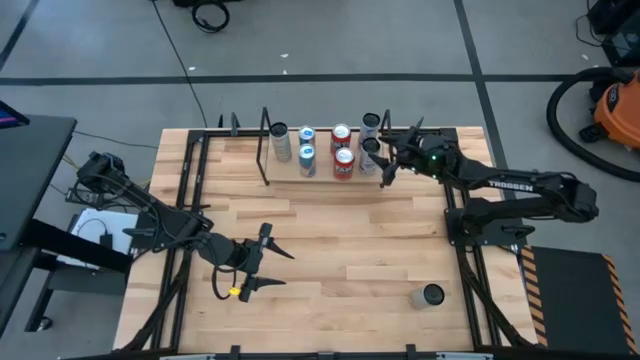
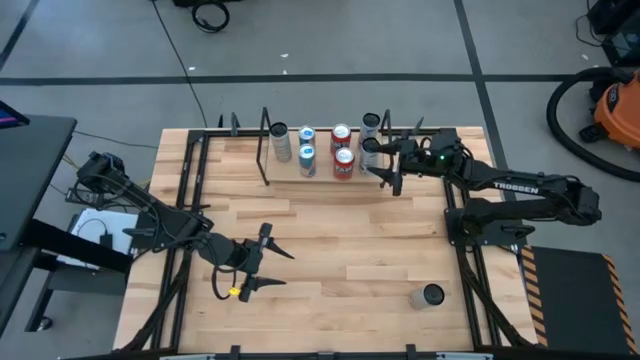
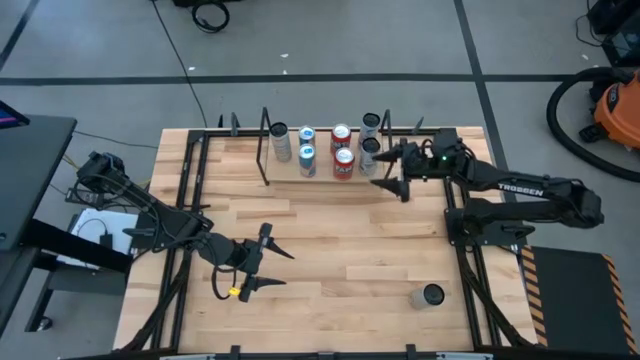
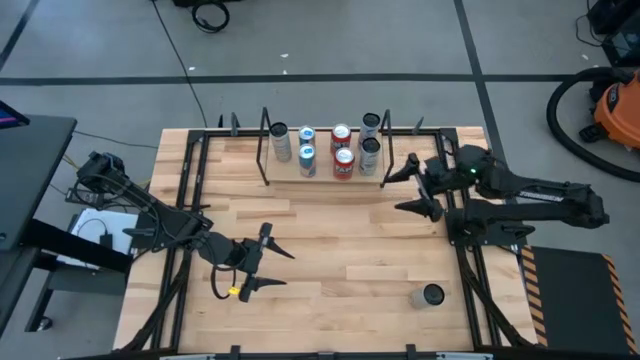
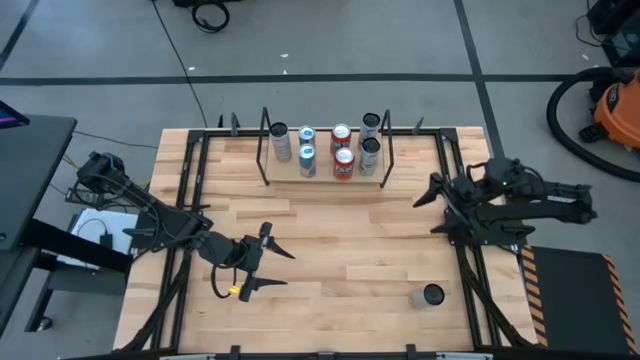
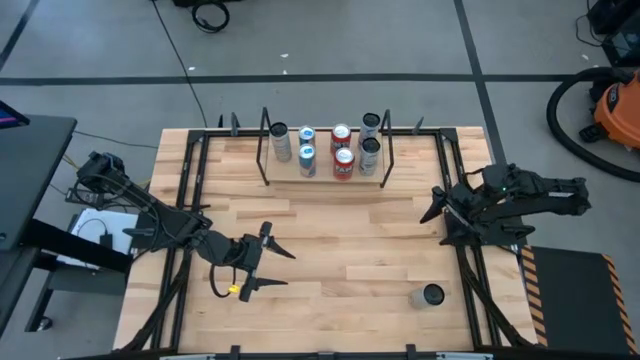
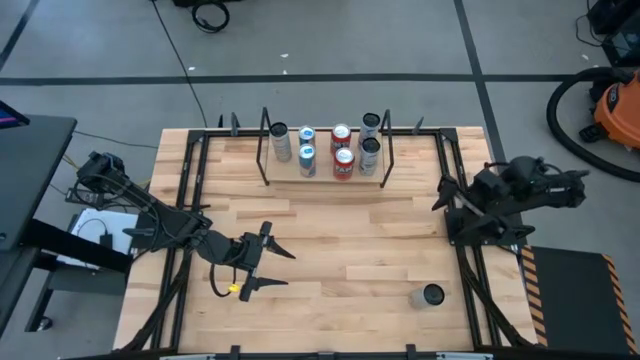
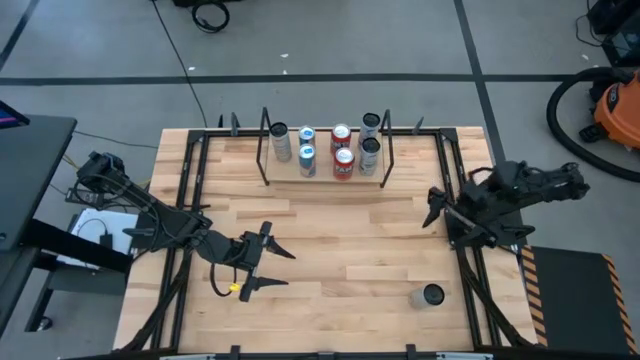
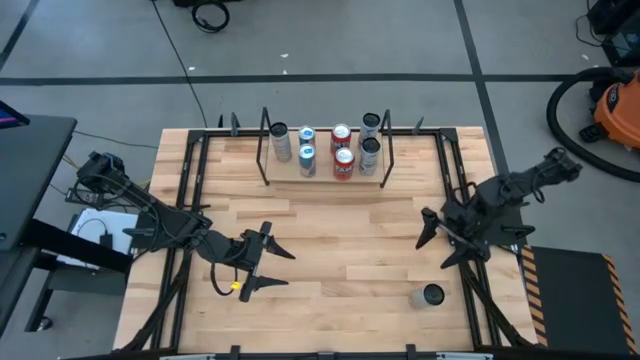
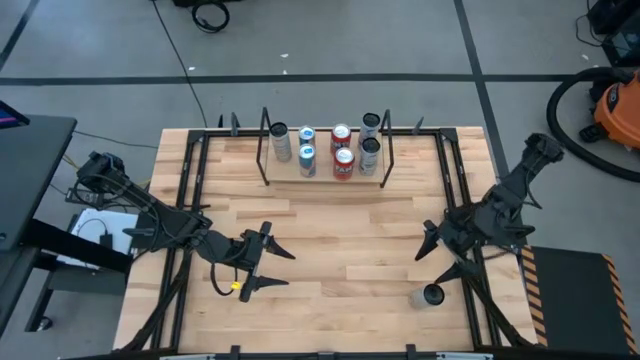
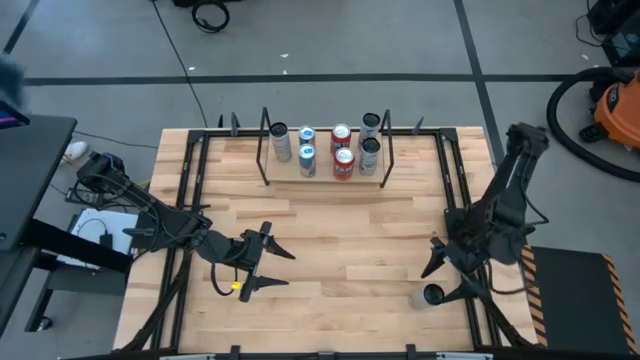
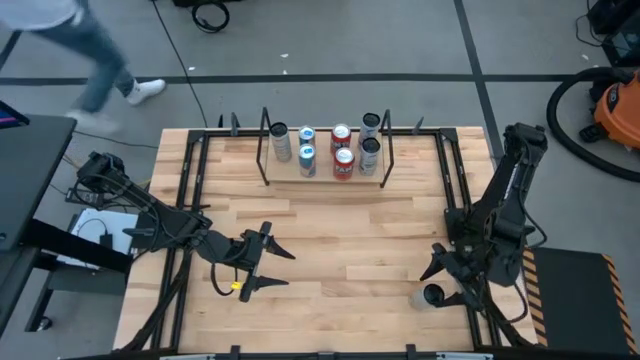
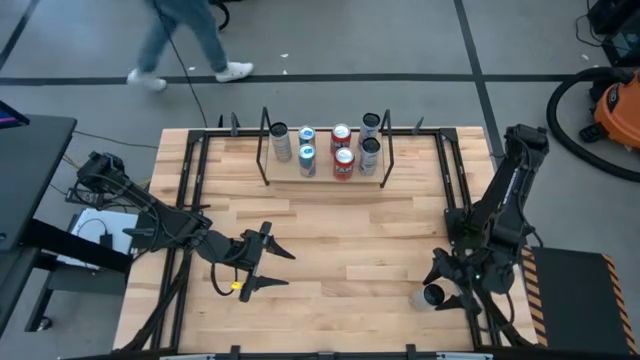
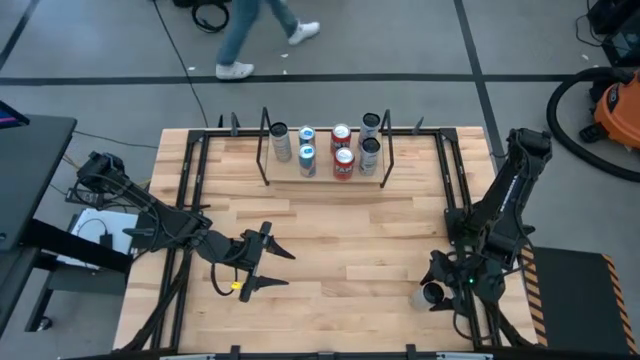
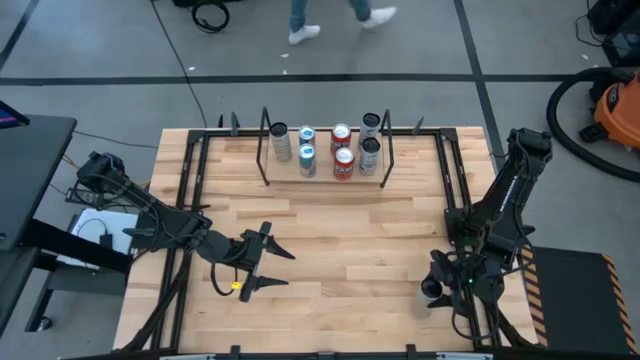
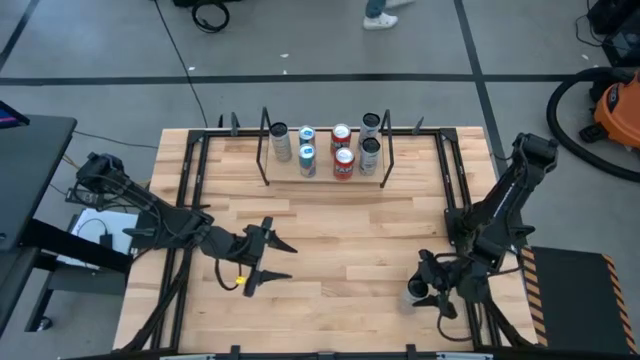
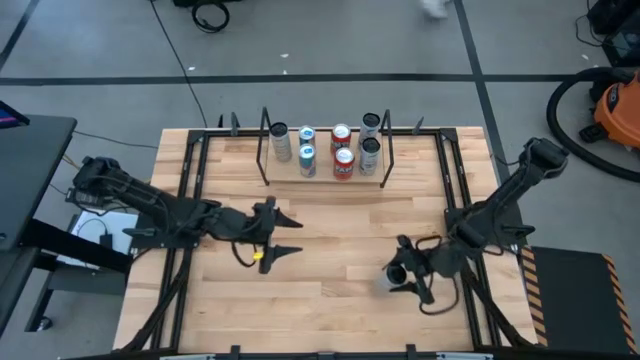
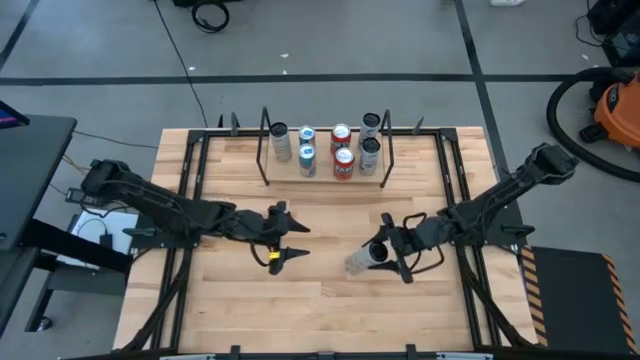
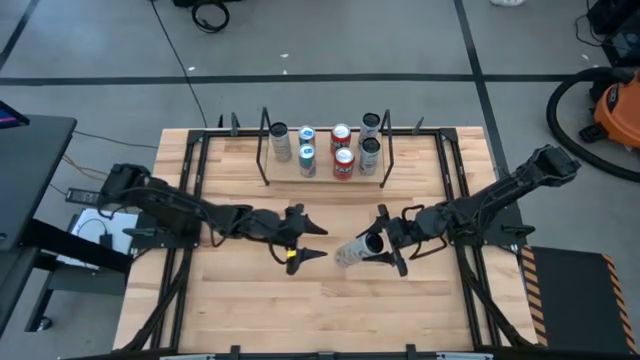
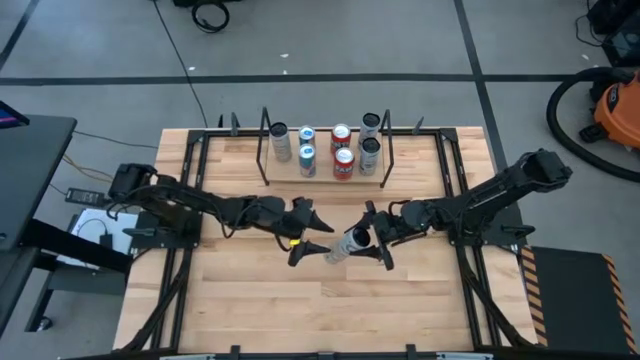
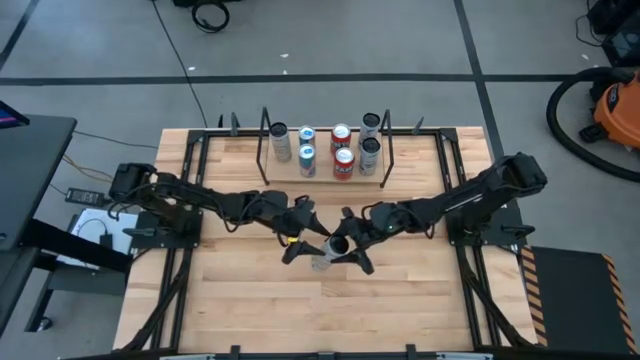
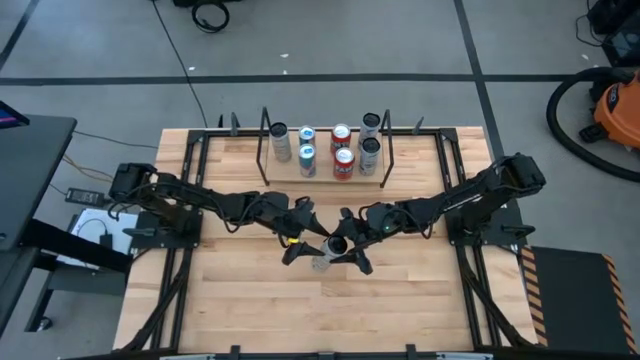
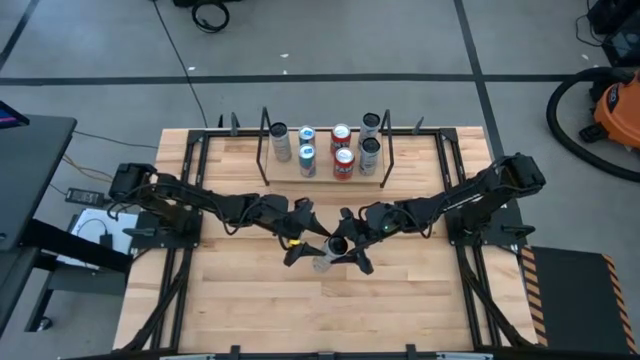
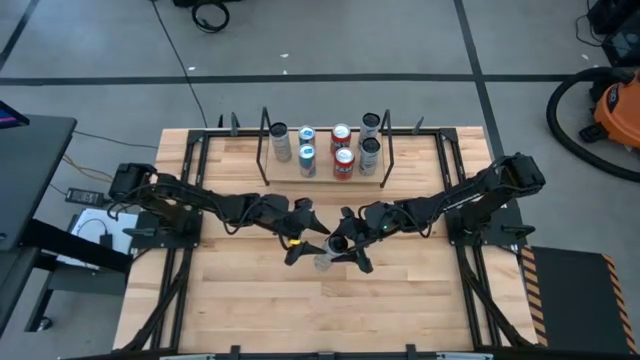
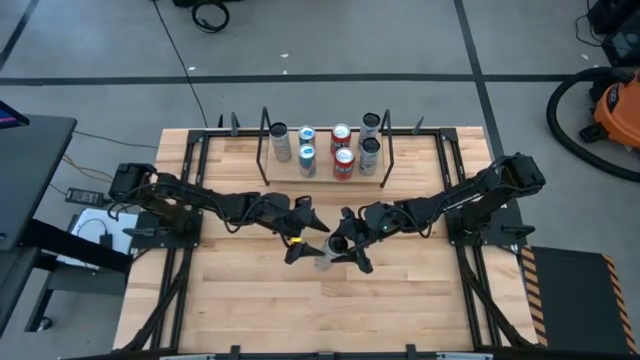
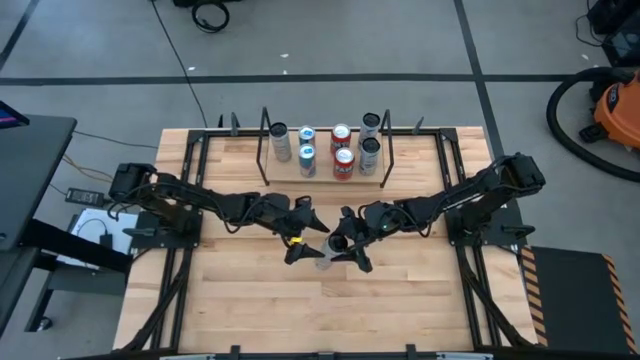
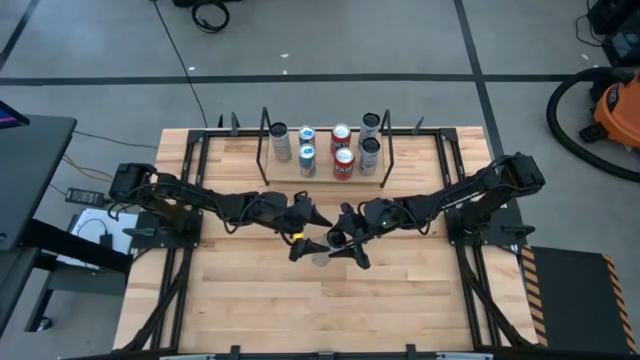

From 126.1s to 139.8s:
Task: Place canned beverage on shelf
Put the white yellow soda can on the shelf aligned with the other white yellow soda can

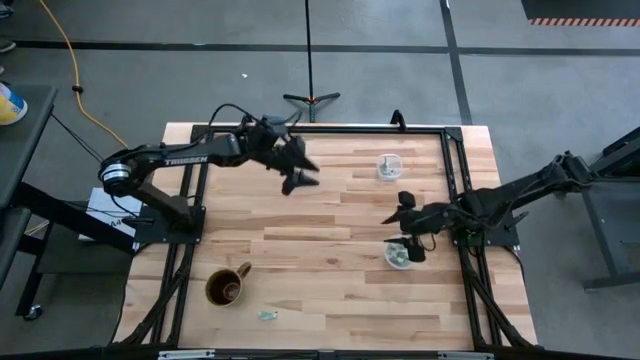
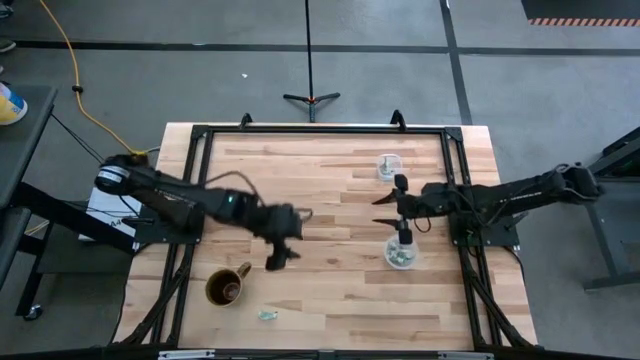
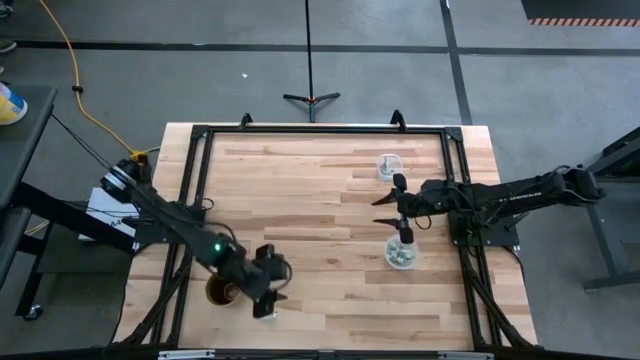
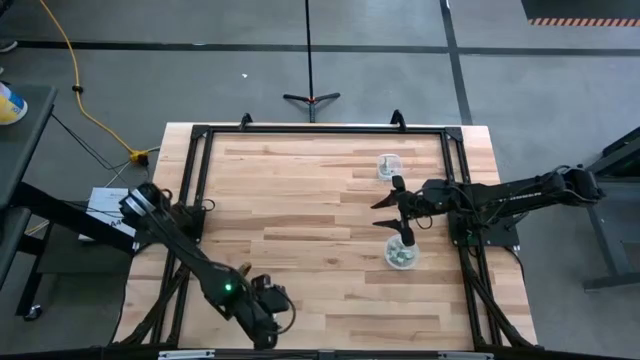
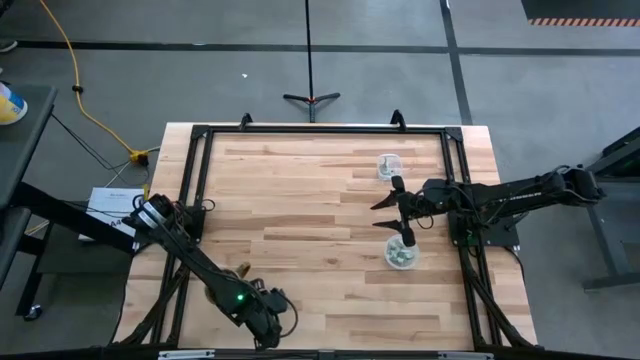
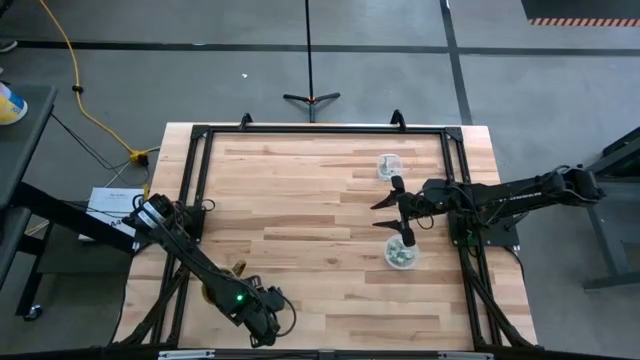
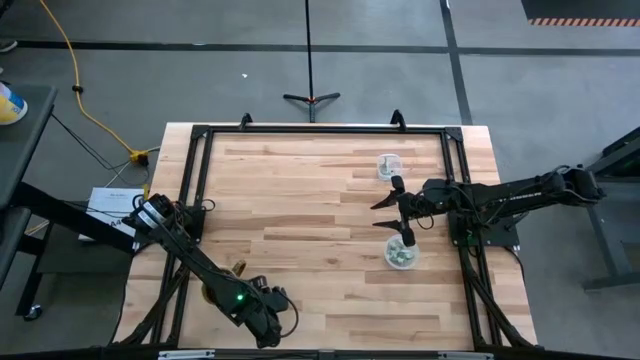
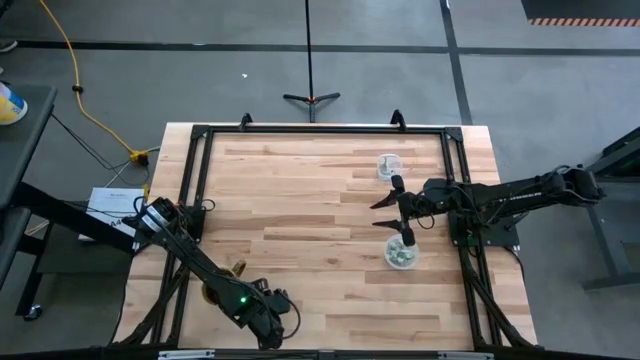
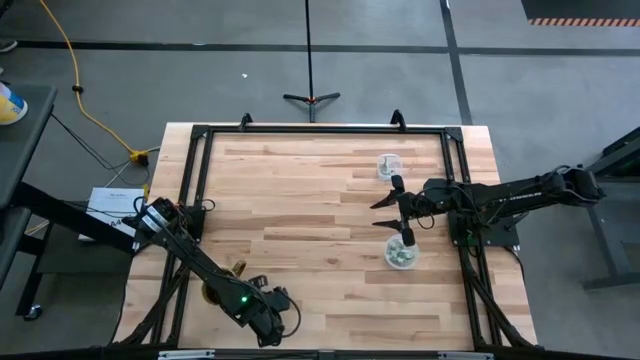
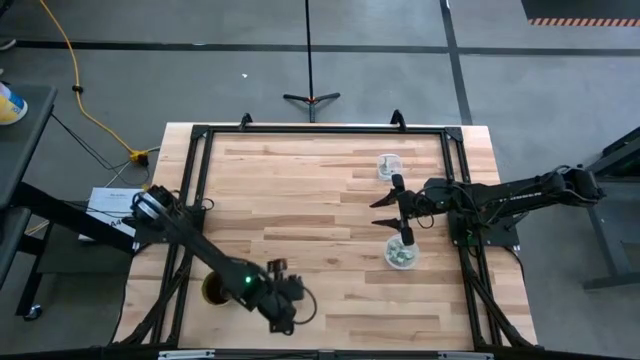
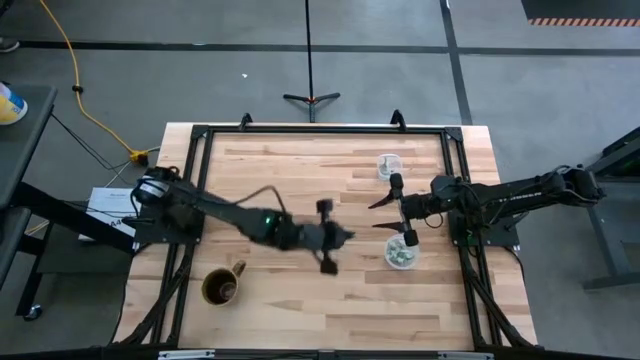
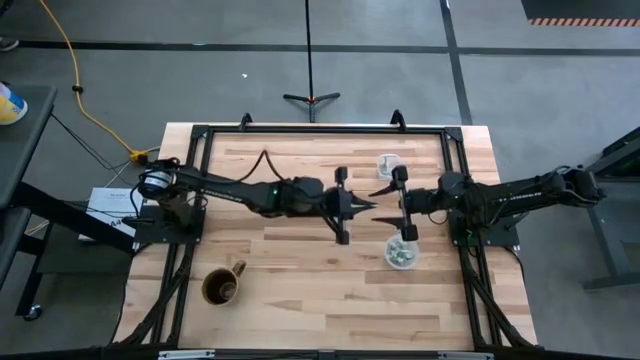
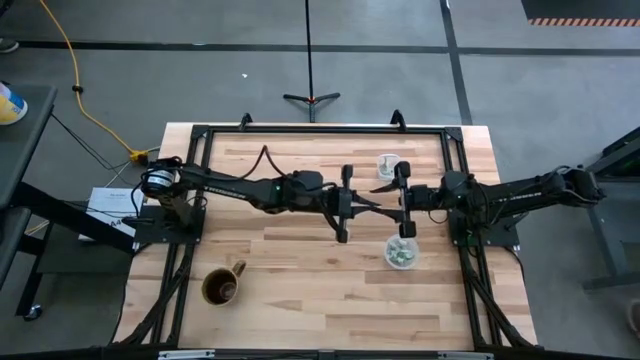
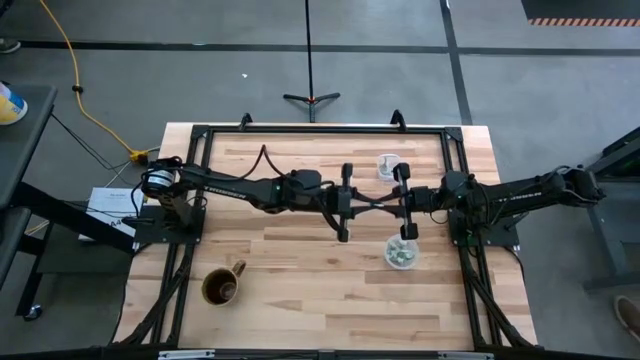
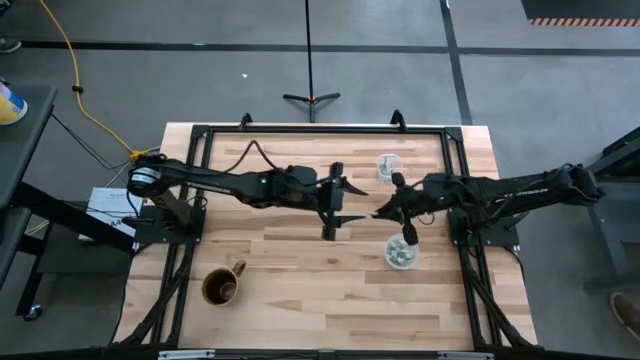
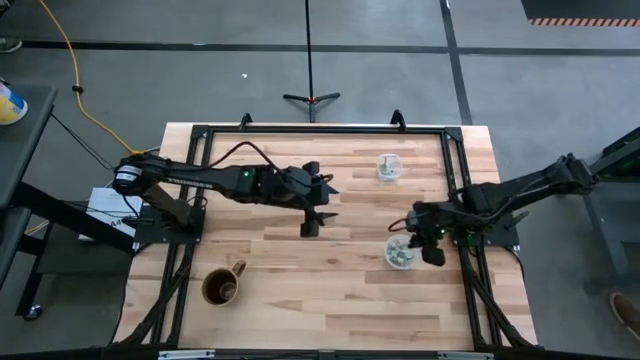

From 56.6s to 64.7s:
Task: Pick and place items into bin
Put the green stevia packet into the bottom transparent bin
